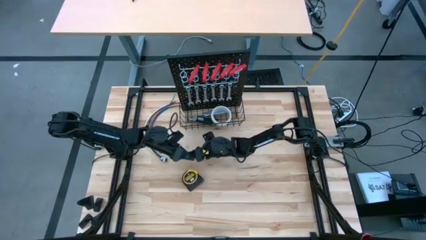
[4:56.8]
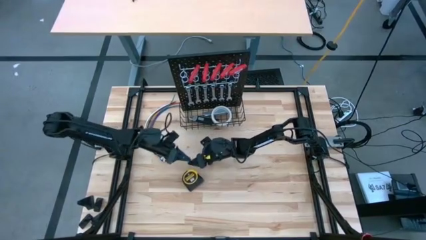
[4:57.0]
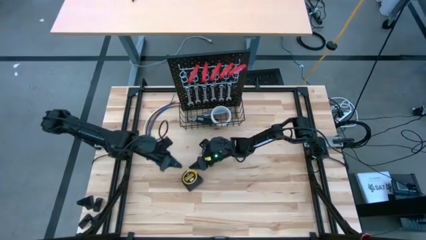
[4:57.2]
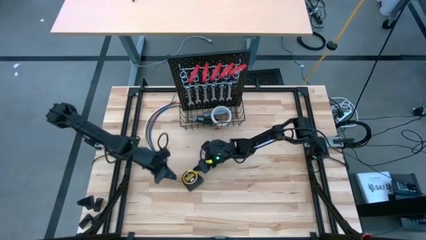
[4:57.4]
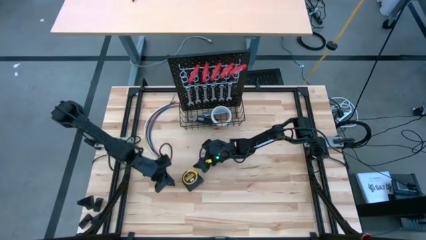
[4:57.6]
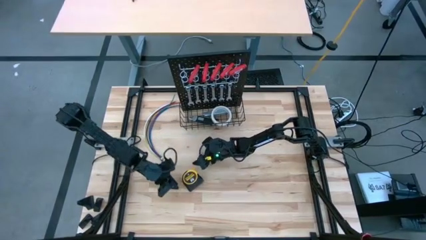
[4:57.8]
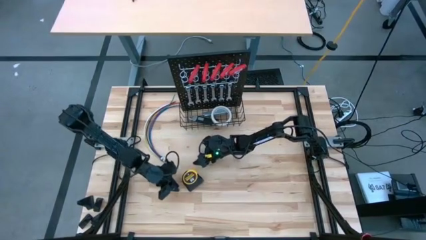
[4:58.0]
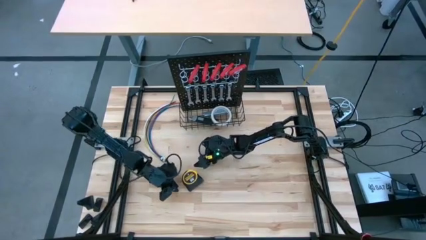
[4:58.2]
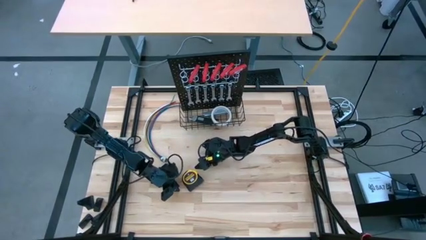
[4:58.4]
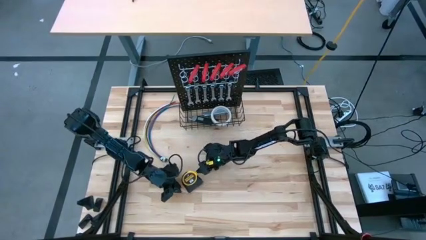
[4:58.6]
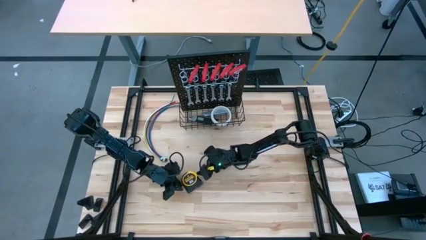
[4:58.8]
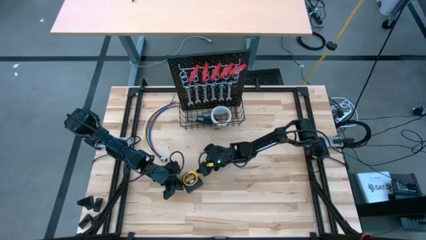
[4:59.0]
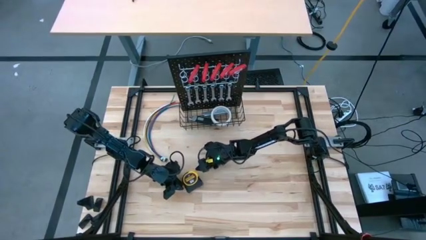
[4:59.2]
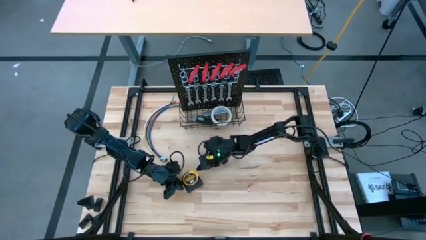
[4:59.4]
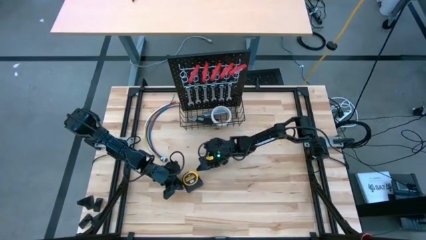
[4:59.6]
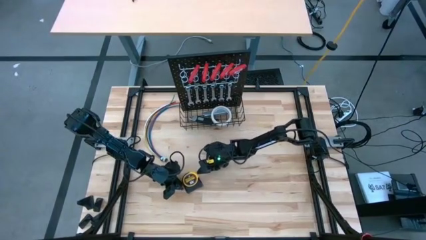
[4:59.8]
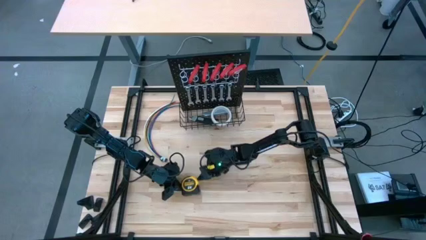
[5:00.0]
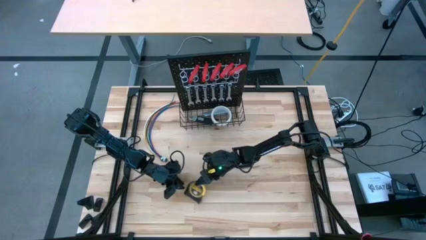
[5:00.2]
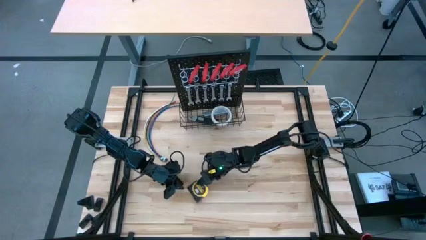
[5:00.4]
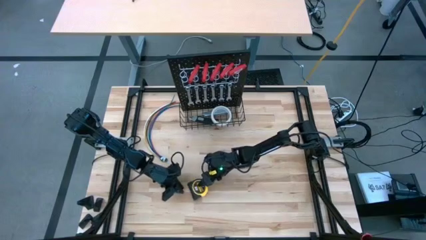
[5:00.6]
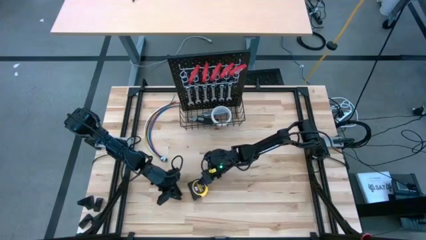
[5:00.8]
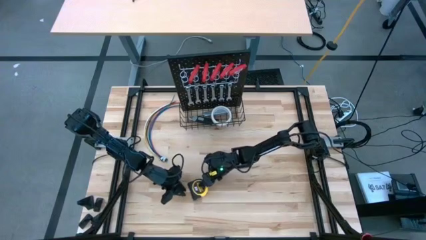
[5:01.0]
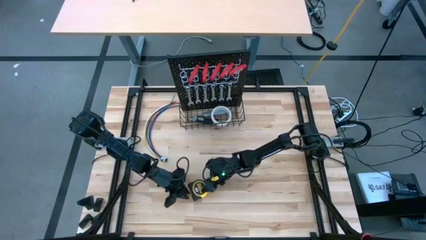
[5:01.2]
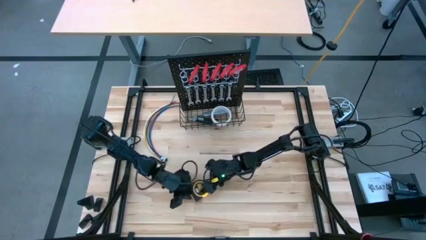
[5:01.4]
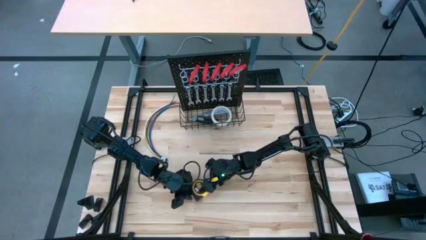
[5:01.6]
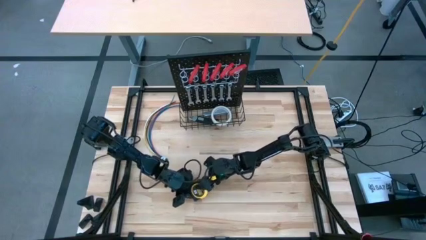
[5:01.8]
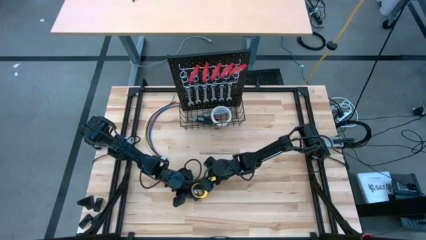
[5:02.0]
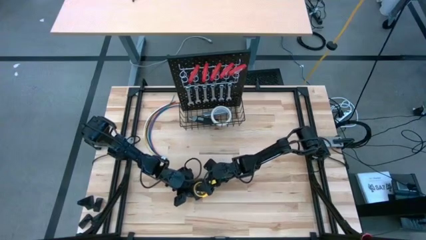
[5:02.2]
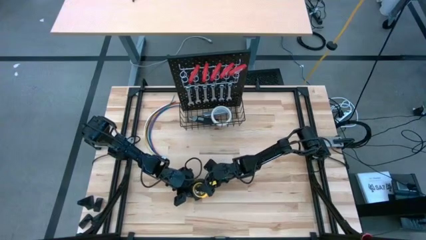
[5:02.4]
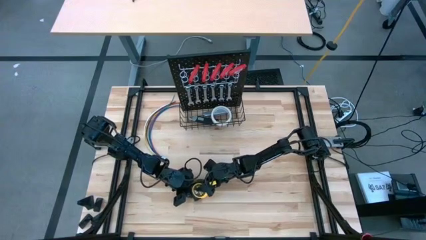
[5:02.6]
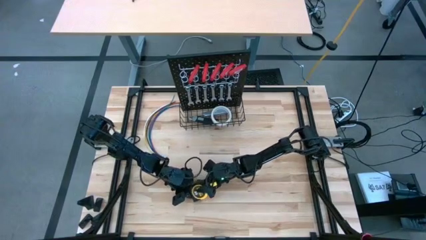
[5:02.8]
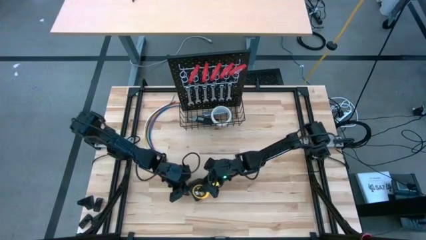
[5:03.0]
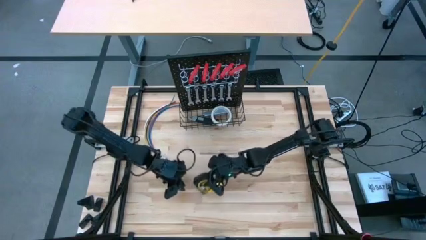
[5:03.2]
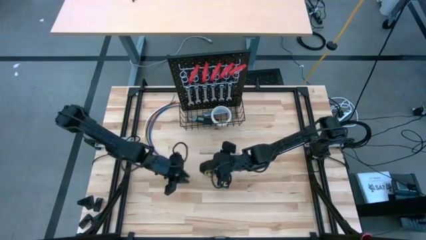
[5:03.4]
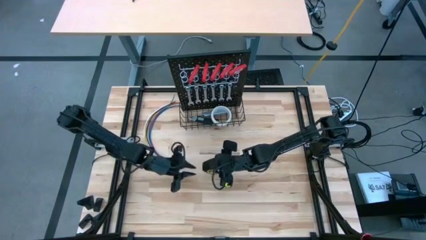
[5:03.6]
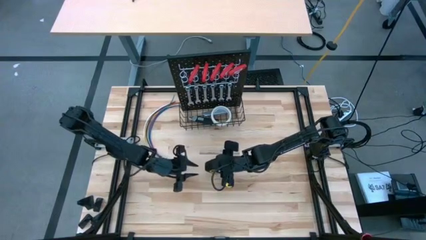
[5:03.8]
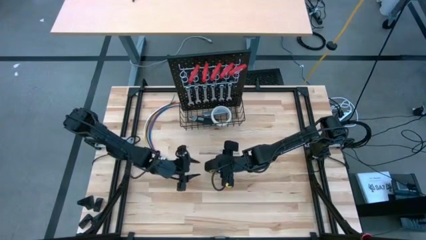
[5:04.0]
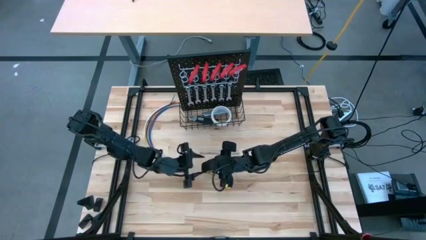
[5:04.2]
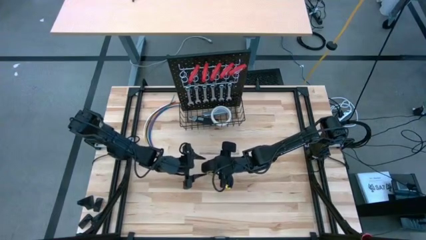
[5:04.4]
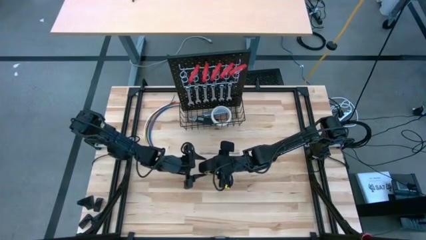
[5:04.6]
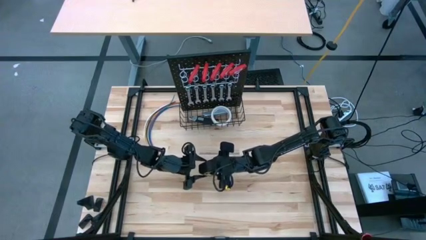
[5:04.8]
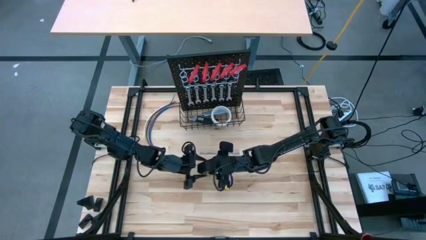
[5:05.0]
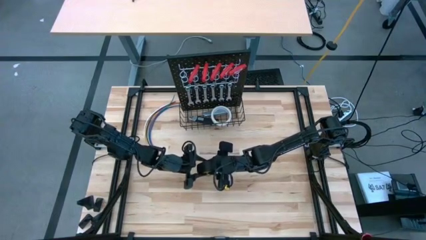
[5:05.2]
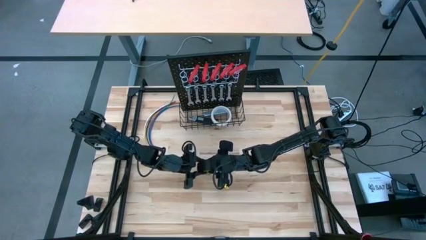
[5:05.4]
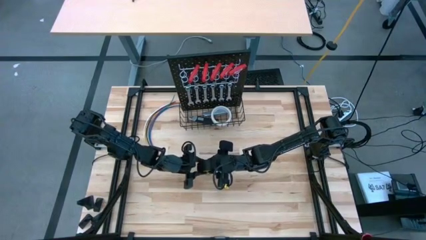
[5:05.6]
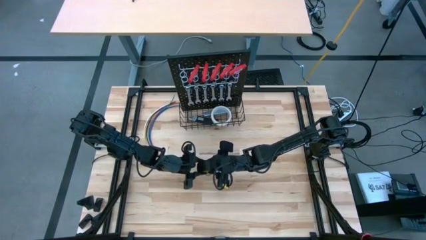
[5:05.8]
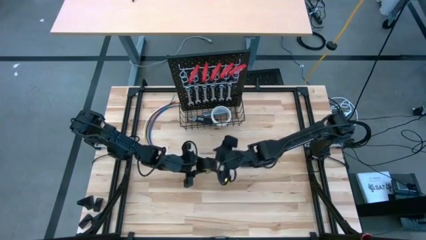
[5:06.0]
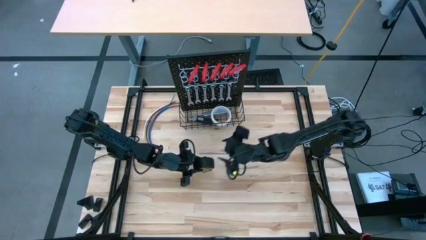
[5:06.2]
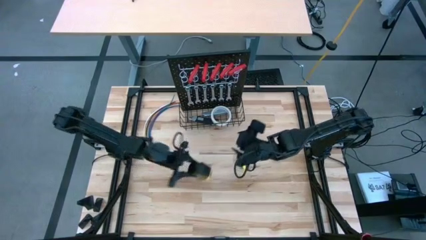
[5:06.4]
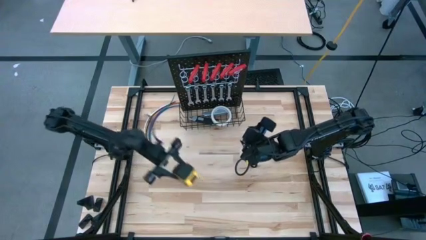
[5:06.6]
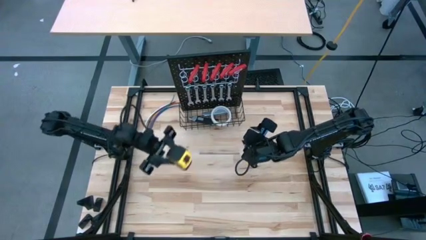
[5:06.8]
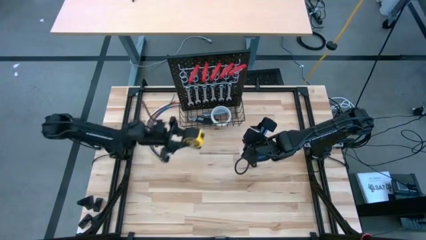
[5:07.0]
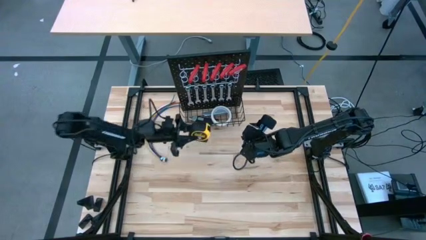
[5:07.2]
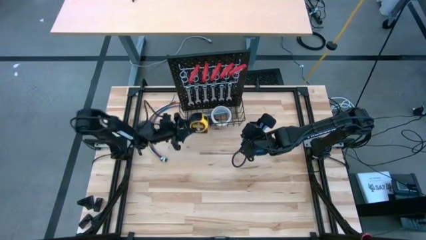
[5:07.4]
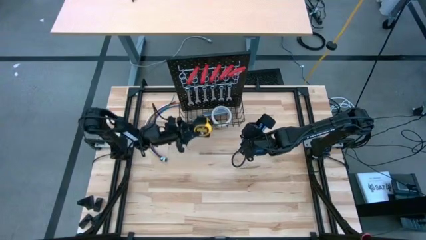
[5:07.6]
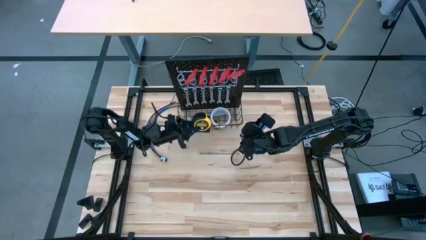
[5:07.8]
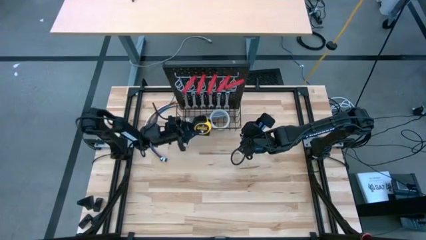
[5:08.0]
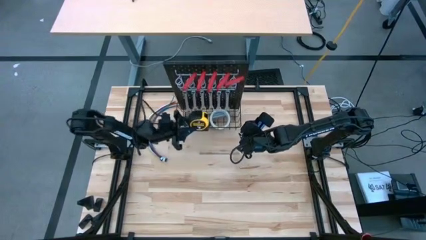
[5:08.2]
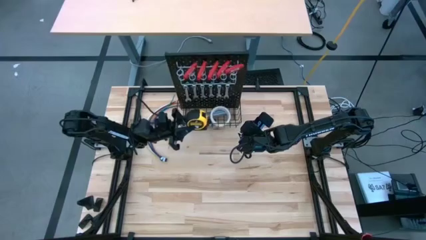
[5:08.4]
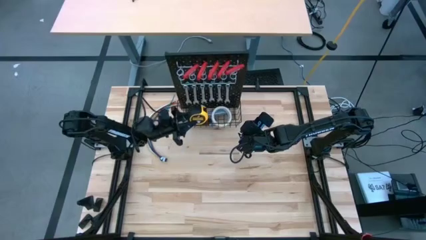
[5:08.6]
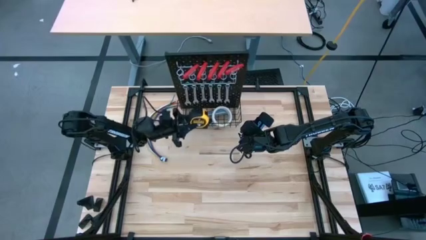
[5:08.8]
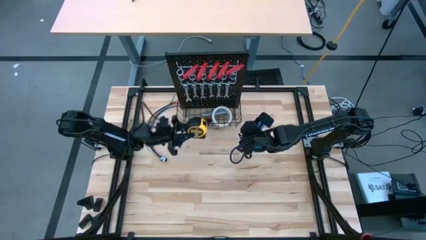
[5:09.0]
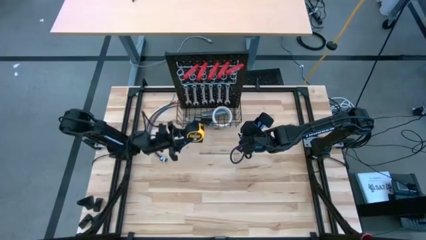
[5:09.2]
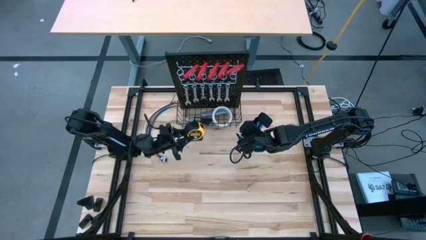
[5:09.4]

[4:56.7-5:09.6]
Task: Hang tools onto peg board
Hang the measuring tape on the peg board

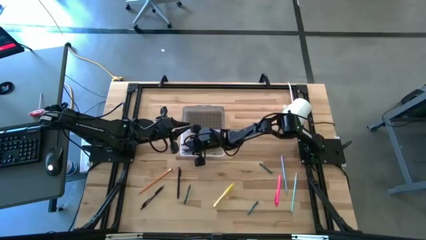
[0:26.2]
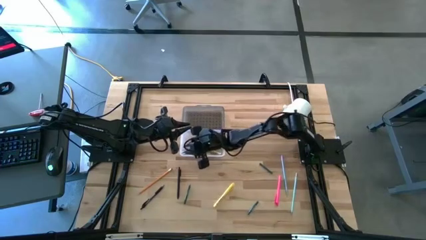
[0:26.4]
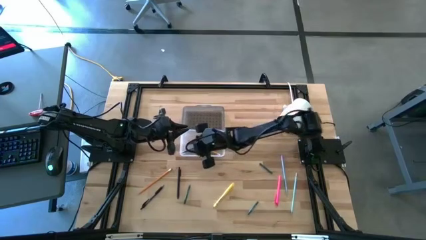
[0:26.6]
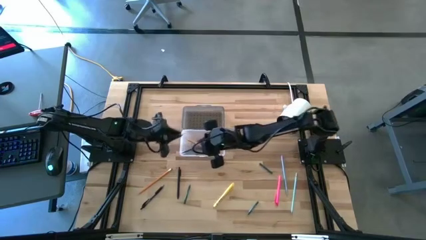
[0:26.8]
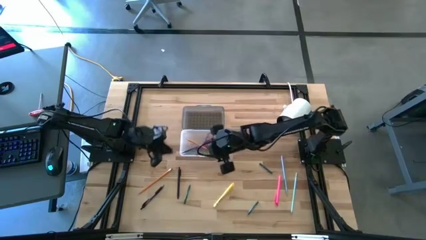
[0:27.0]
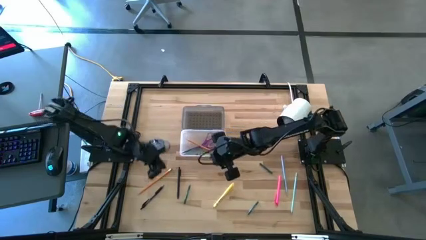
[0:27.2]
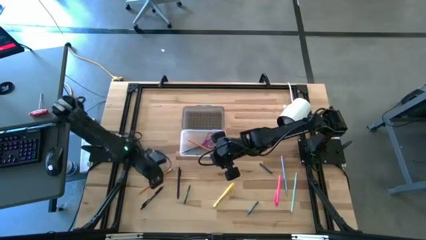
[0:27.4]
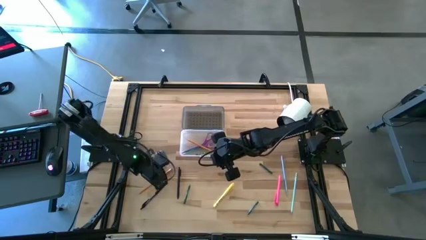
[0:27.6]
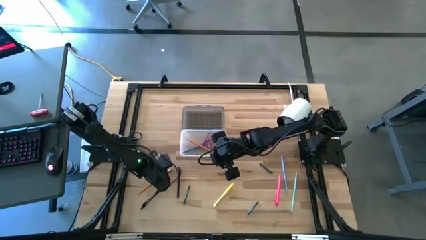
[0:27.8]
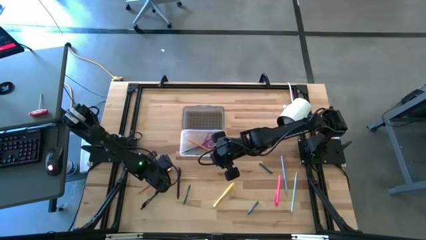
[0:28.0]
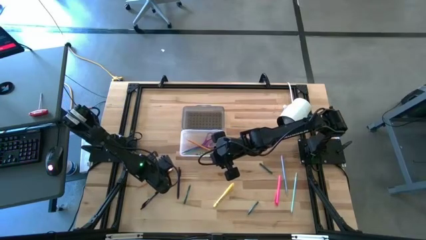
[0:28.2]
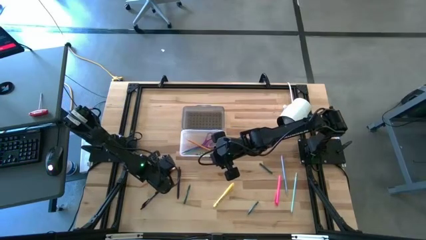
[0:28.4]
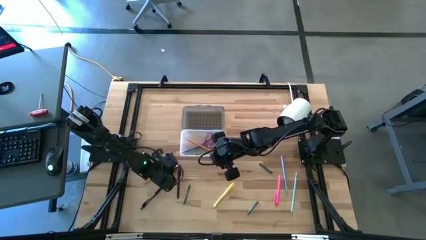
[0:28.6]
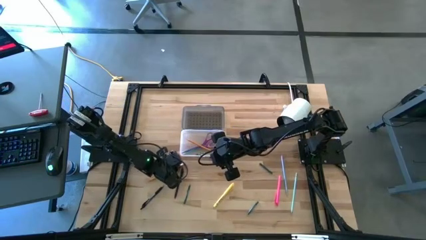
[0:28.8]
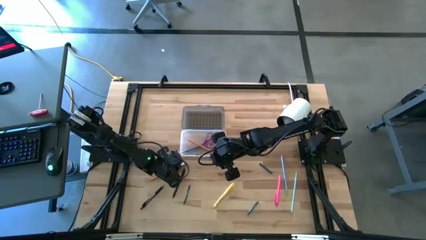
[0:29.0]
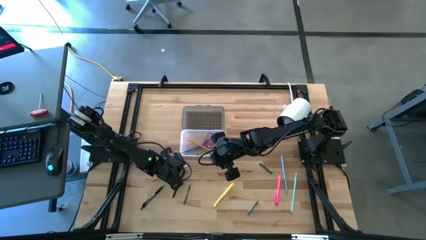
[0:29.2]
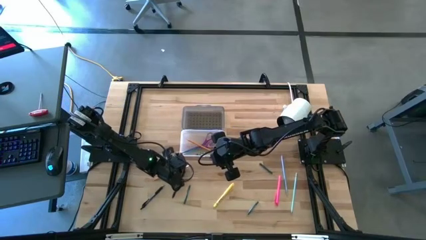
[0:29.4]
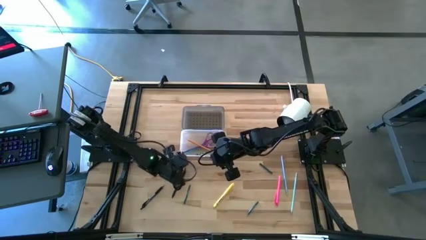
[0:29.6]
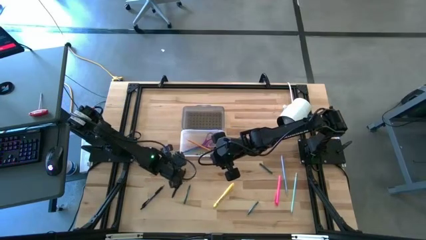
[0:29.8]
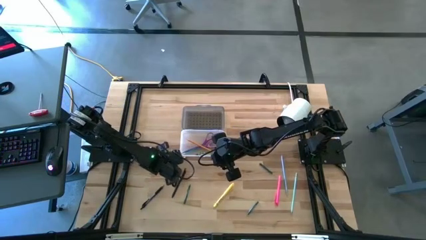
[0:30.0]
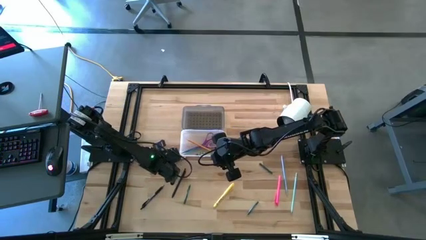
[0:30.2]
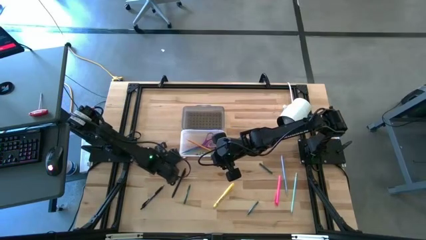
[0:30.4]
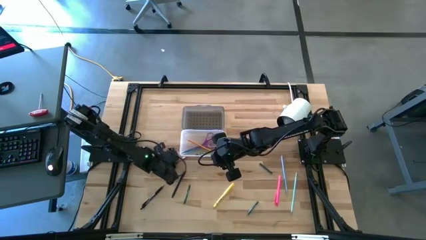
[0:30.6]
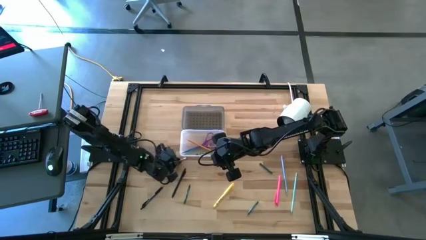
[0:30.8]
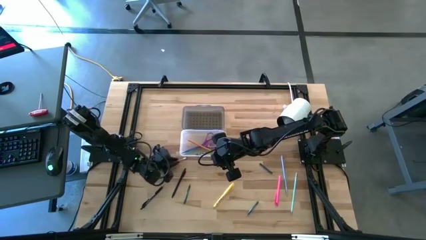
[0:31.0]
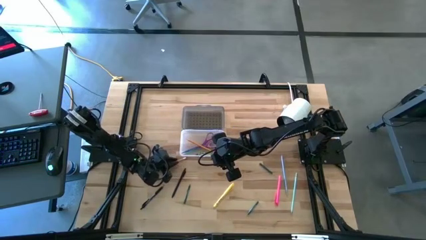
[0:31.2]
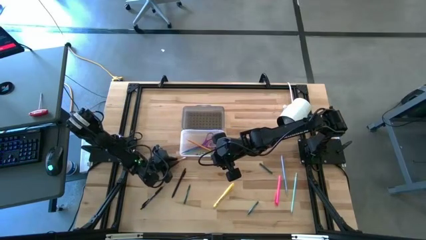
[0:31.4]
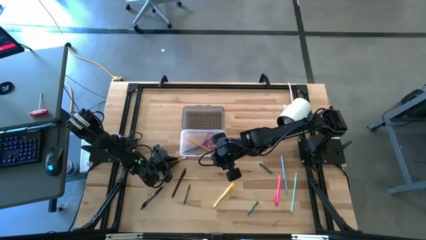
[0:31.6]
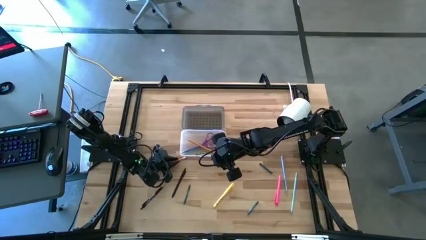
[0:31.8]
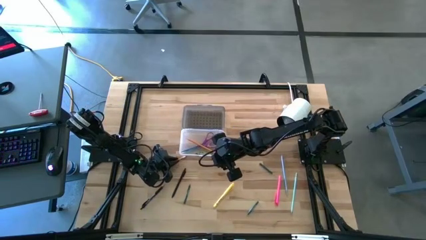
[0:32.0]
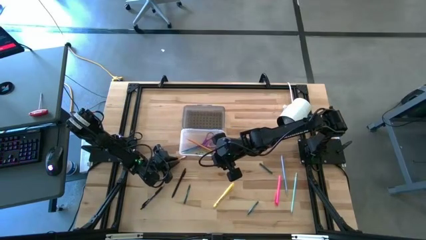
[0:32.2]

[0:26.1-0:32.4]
Task: Pick & place school supplies into a supply box
Put the orange pencil into the black box
